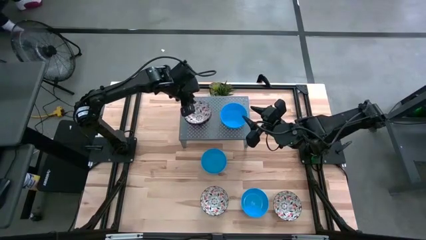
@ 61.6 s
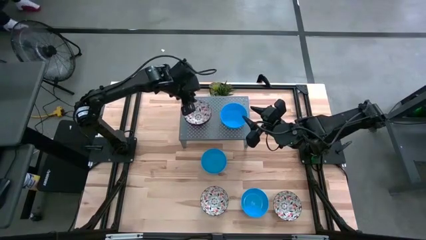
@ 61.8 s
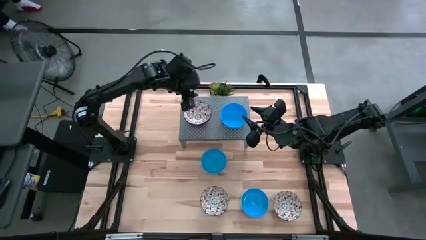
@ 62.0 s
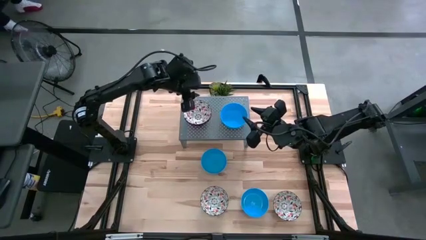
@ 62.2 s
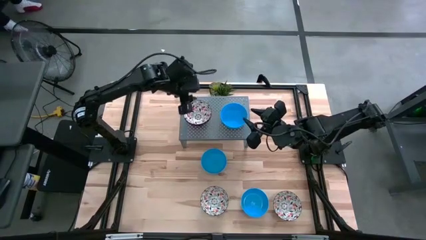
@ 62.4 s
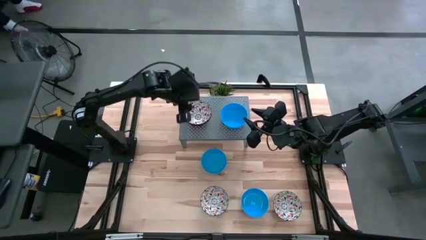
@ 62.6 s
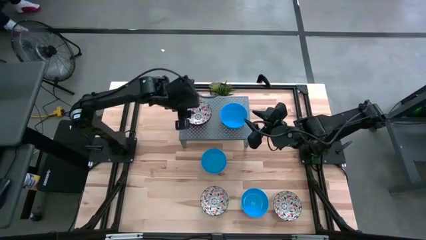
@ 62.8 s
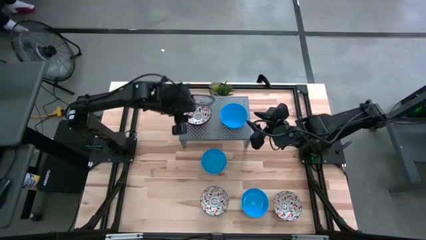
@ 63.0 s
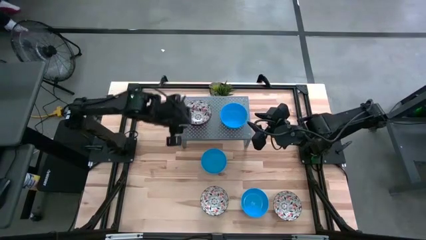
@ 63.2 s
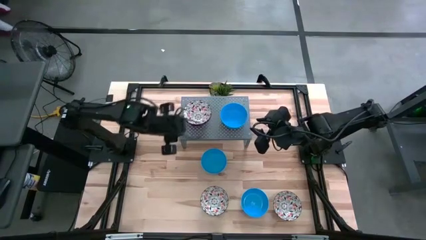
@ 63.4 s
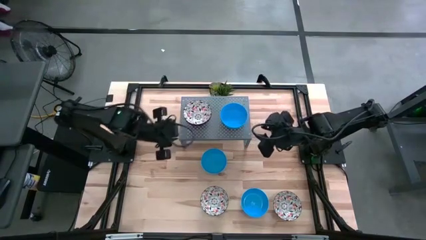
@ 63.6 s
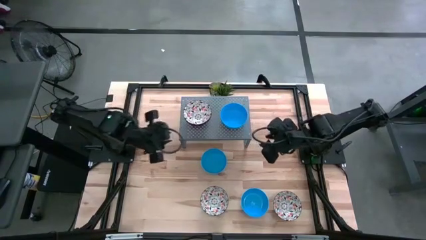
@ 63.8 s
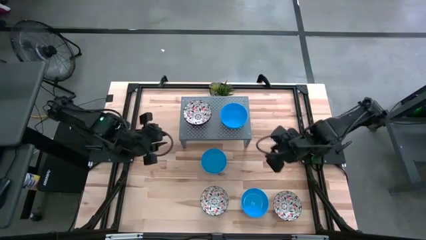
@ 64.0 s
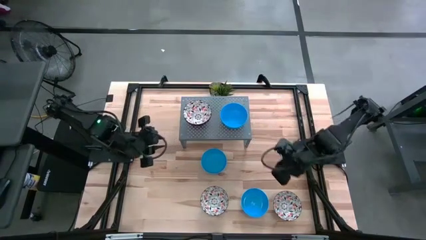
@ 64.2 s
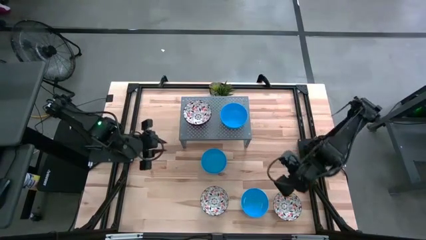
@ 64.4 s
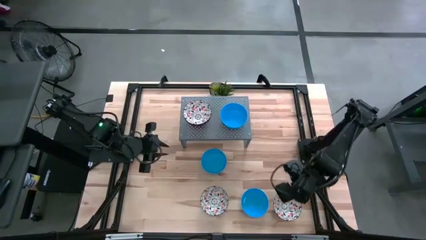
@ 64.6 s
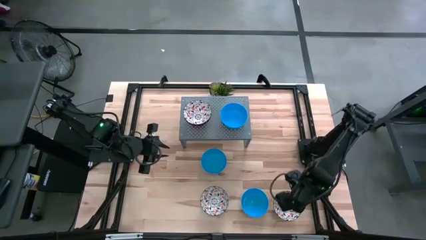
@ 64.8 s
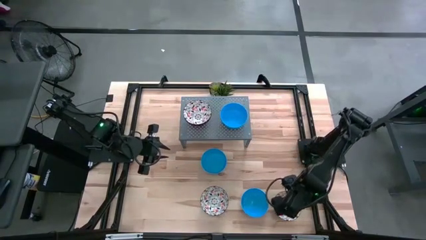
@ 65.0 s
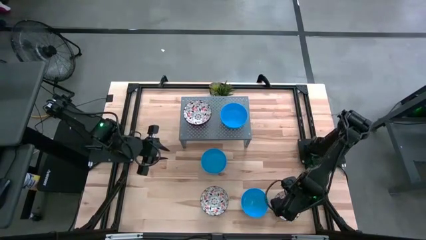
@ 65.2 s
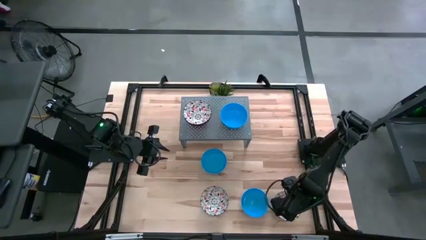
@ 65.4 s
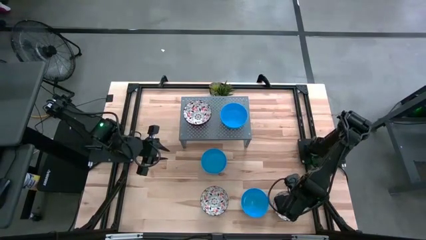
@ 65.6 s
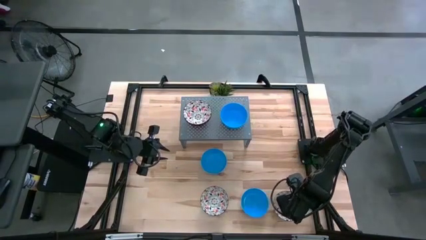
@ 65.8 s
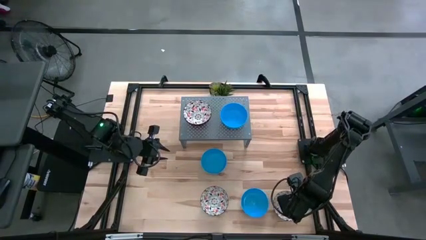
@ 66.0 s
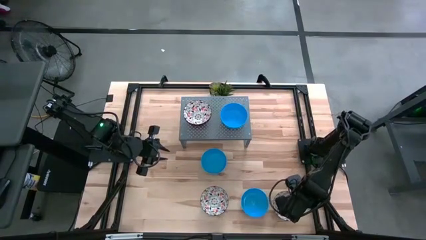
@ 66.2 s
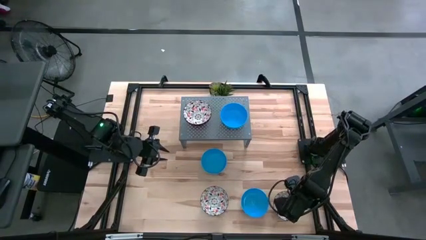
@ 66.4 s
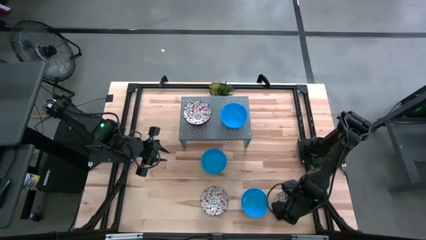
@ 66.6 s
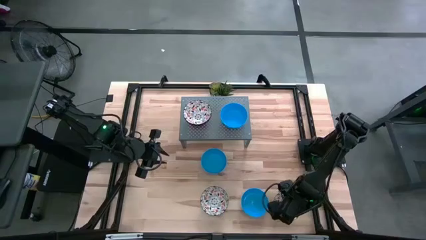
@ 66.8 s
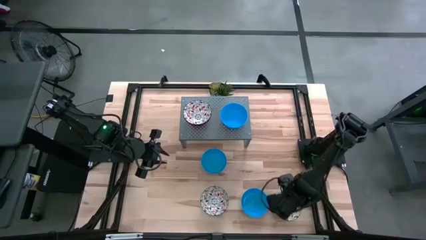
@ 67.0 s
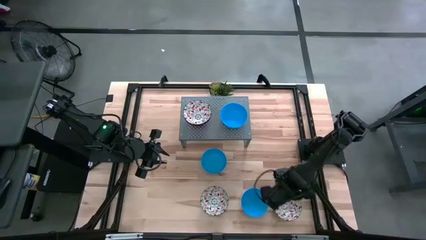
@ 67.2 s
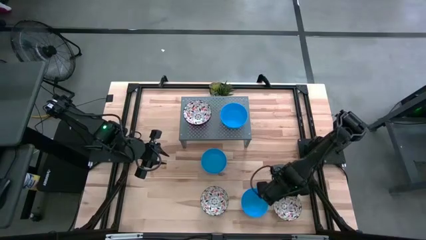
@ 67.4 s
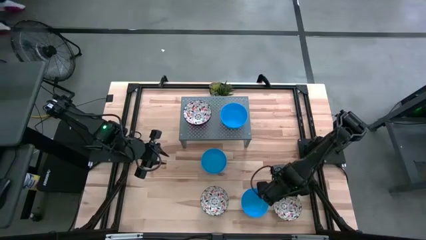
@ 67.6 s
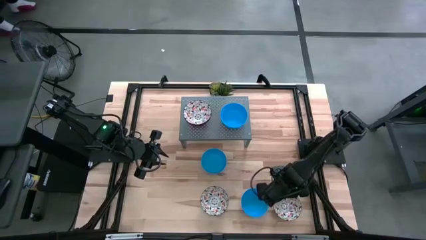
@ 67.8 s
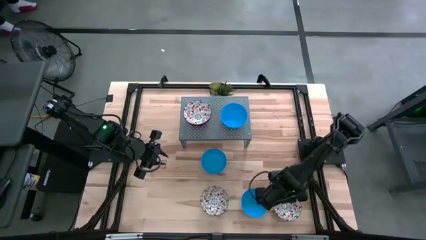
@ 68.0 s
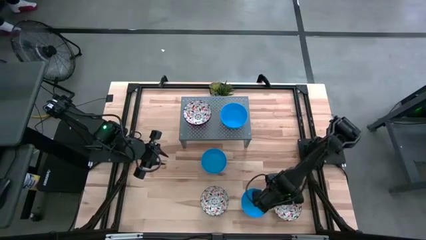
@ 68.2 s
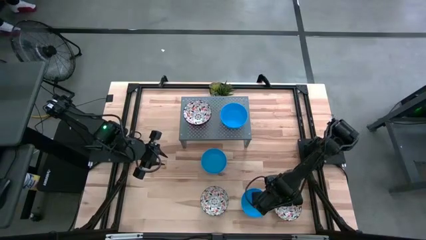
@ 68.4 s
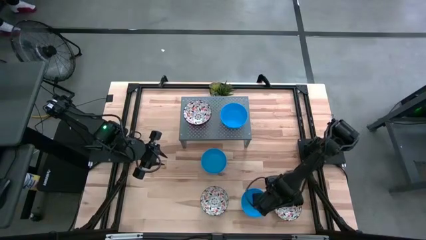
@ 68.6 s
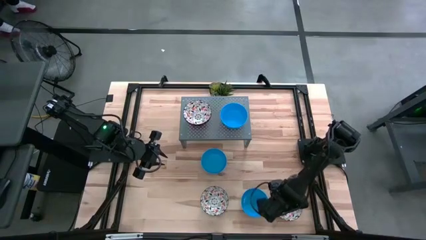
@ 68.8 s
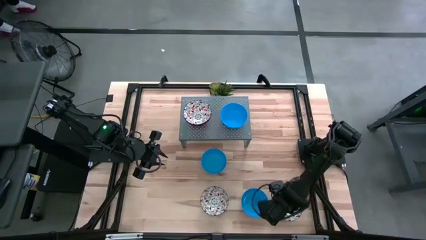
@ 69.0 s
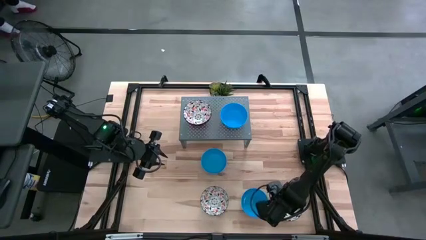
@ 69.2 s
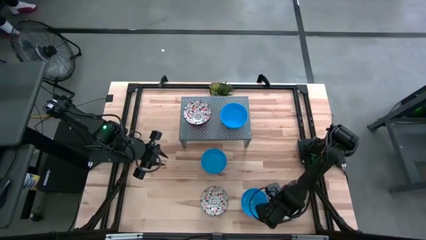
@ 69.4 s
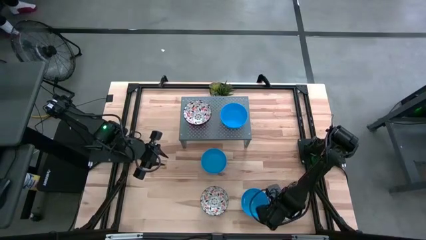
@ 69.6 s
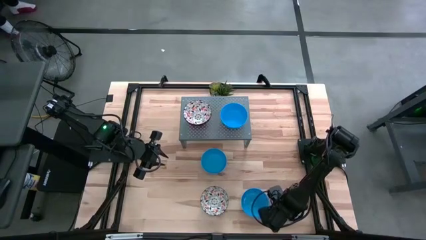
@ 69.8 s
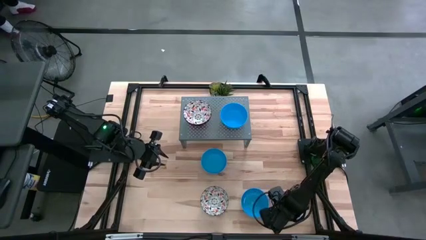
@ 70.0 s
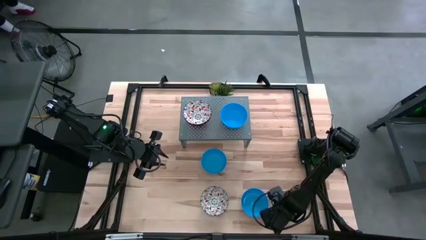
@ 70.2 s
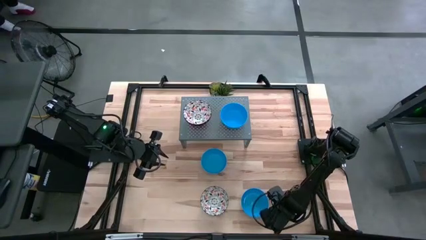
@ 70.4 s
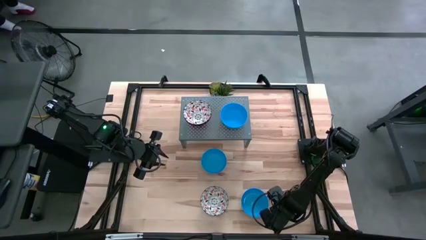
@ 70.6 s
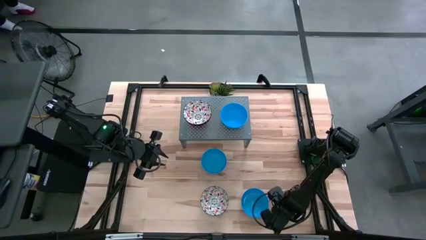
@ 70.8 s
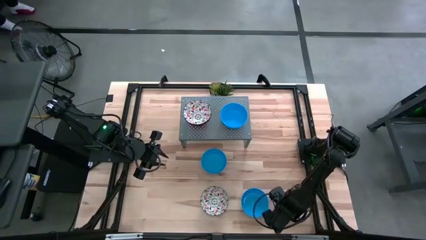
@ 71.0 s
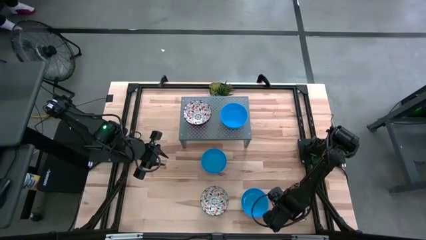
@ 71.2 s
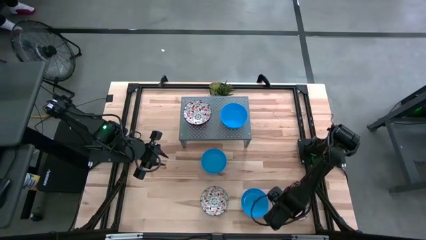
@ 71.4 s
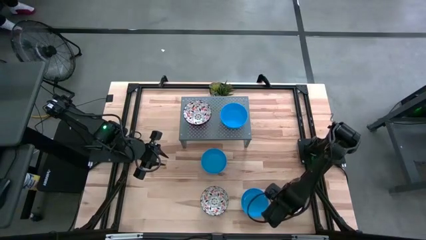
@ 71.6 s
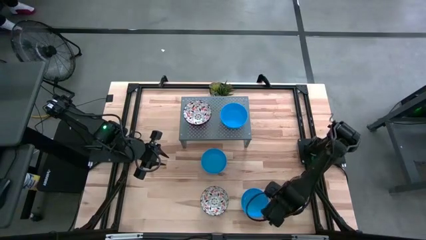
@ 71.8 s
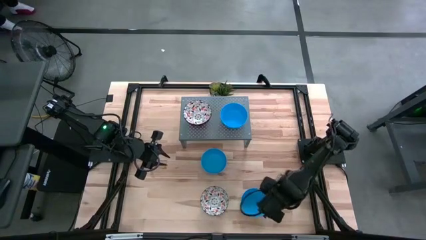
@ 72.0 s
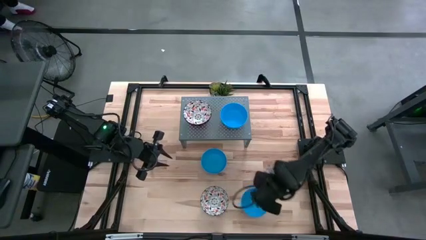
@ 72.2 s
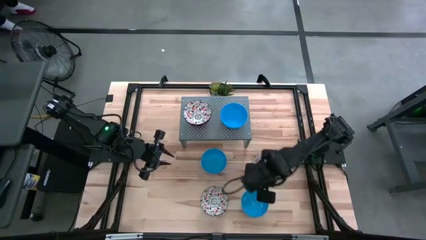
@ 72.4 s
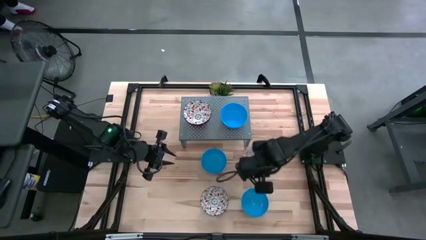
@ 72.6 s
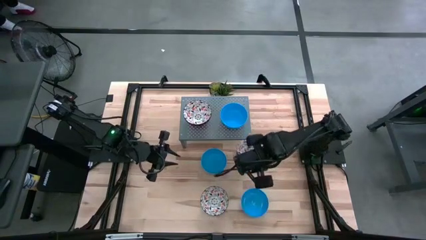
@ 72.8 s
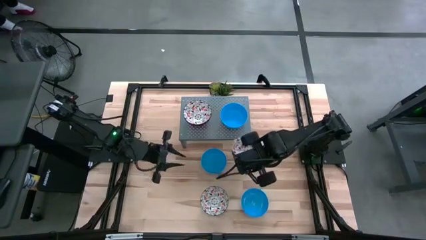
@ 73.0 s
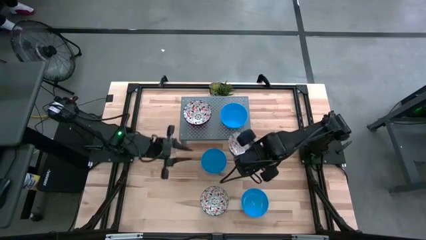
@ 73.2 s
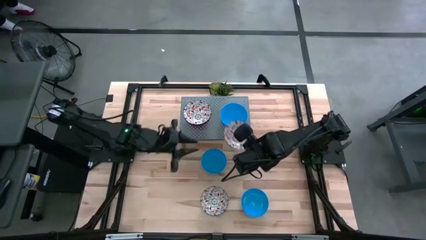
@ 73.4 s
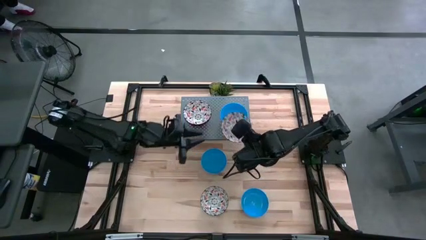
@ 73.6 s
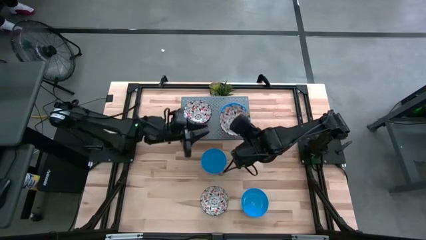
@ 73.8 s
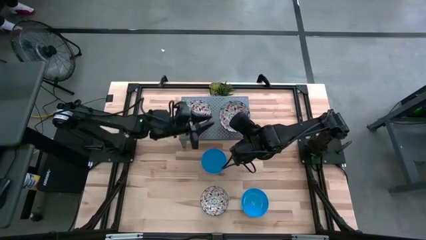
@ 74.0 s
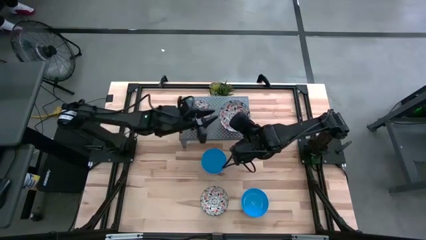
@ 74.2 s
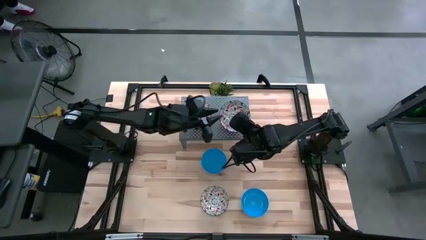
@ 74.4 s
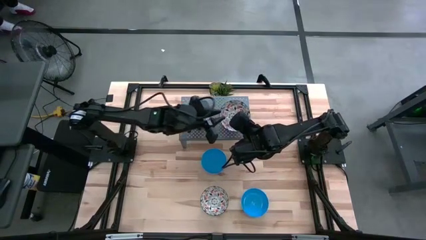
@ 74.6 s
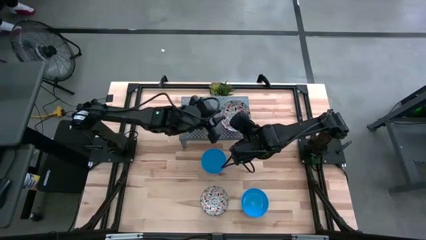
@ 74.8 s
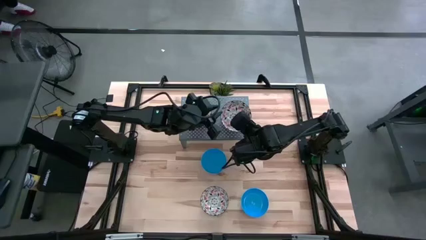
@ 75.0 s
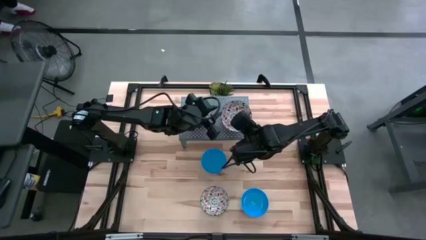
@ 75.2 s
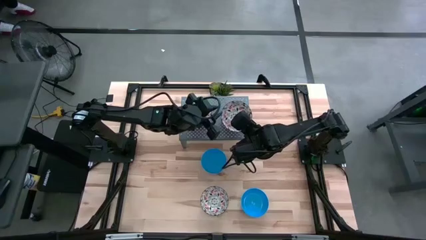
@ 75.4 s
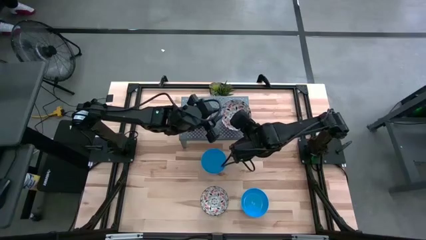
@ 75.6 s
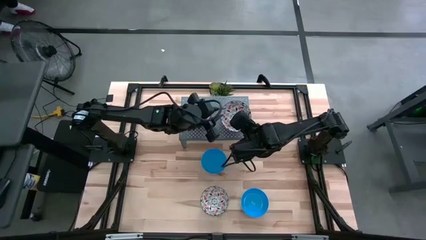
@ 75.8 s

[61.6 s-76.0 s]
Task: Pick & Place Mini bowls
Stack the white patterned bowl on the stacked white patterned bowls on the shelf
